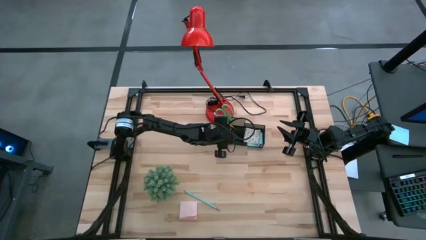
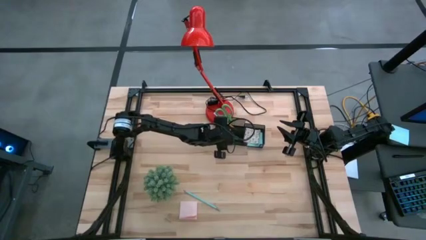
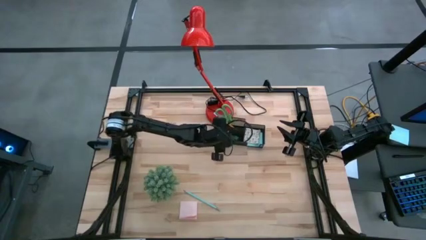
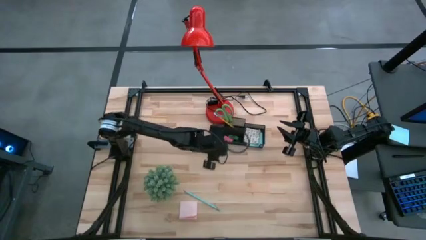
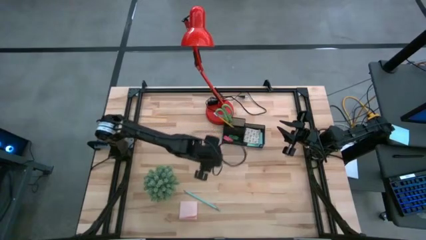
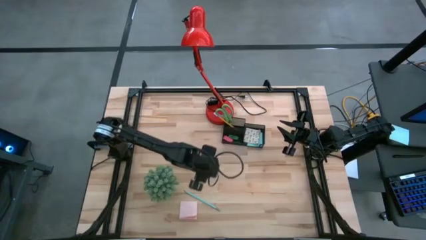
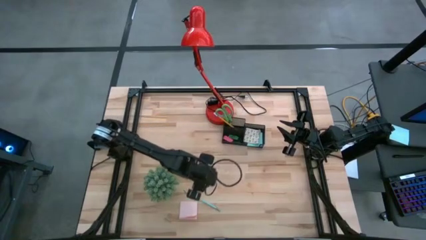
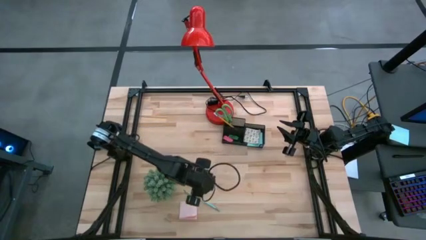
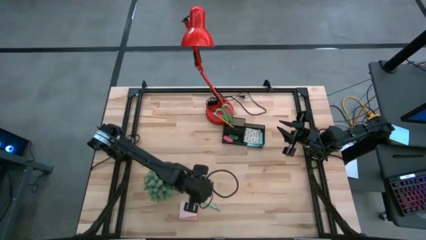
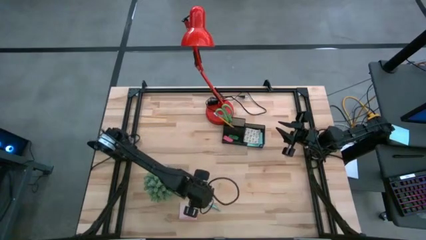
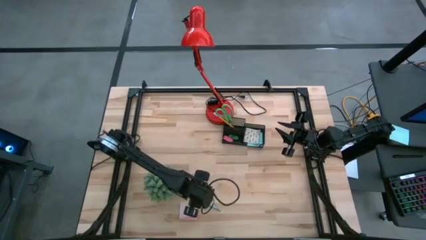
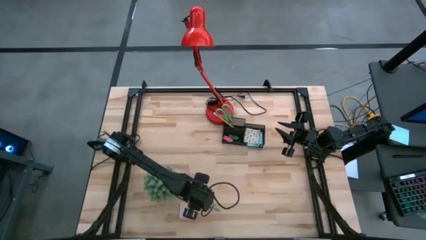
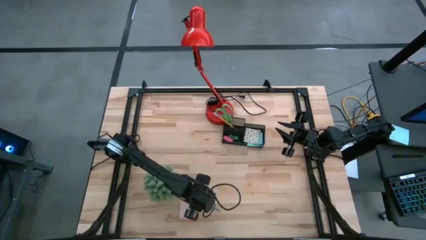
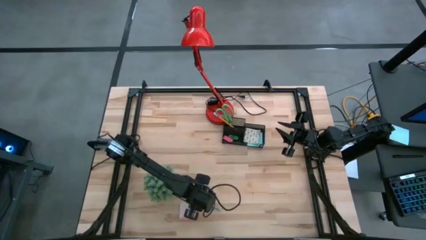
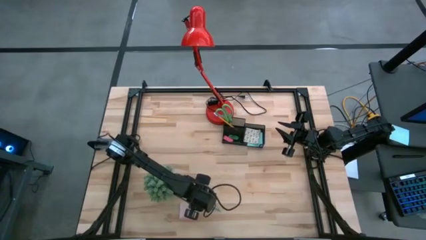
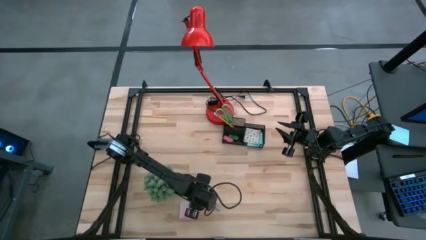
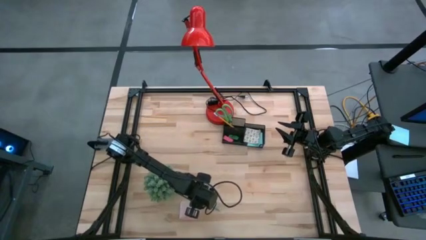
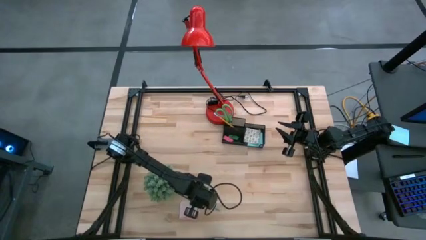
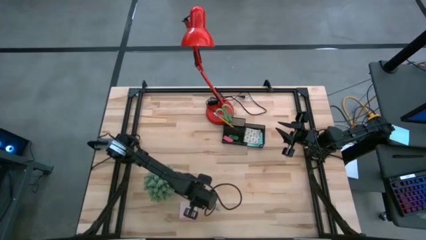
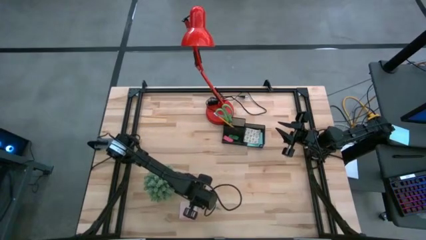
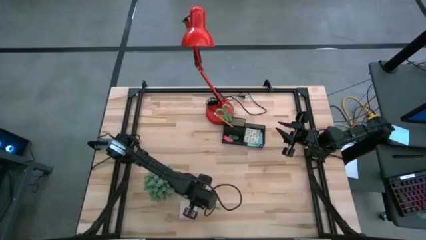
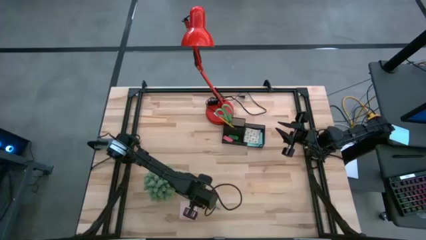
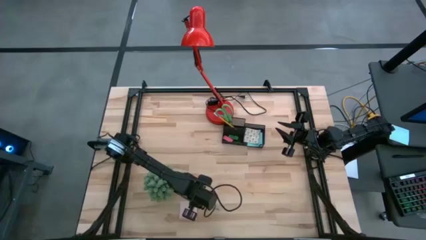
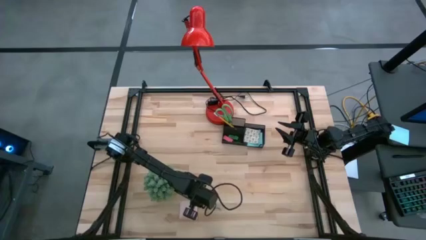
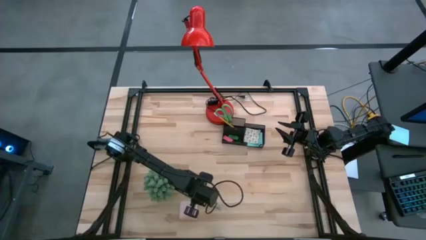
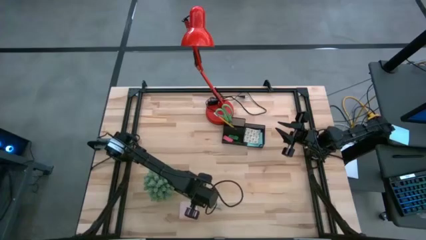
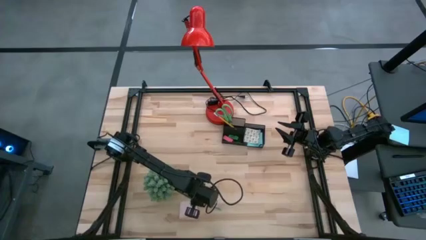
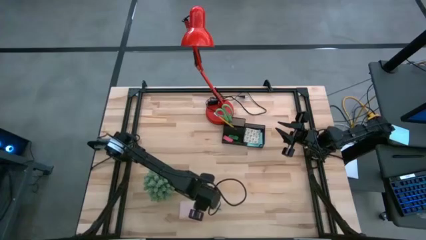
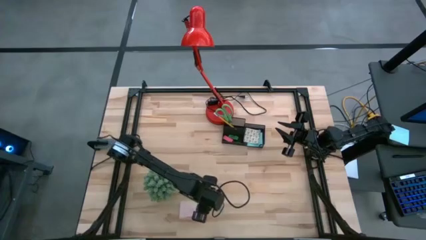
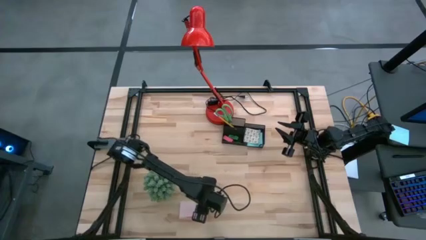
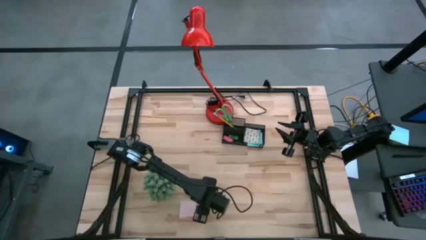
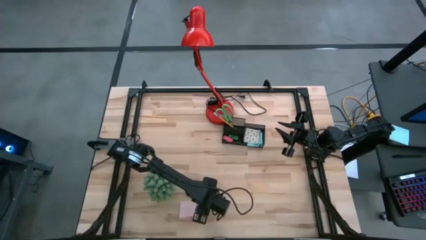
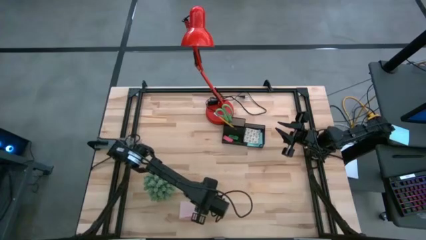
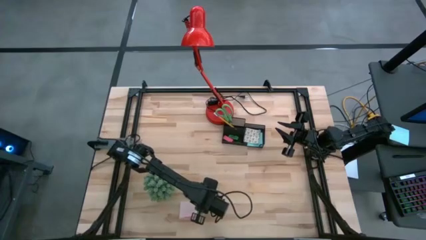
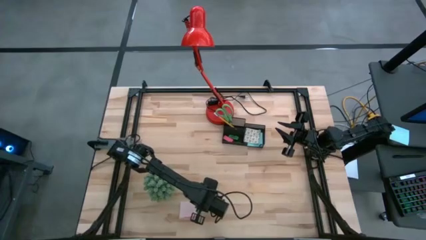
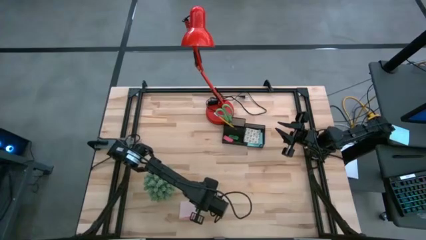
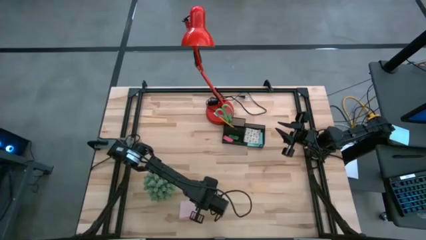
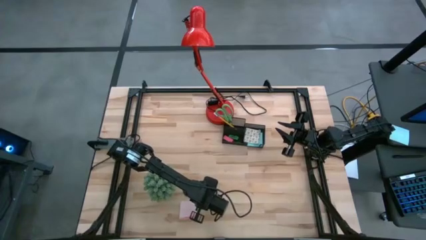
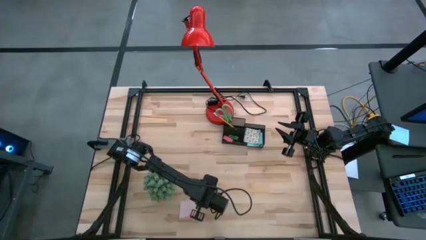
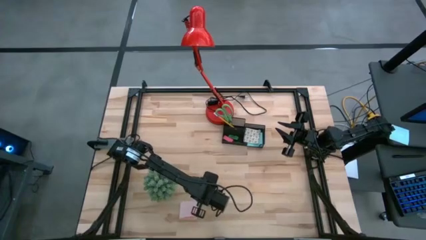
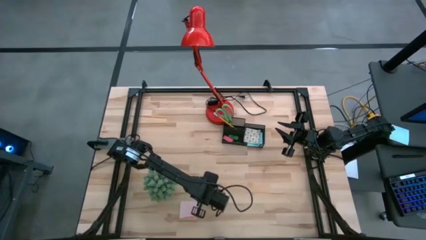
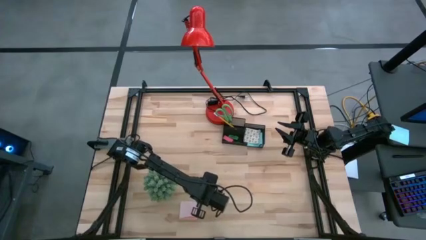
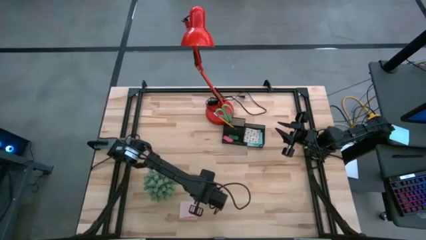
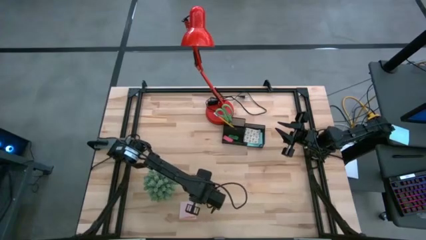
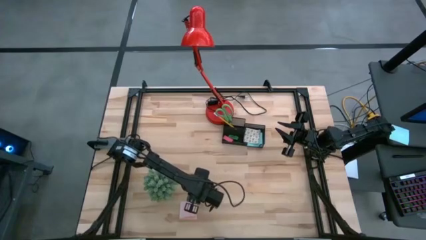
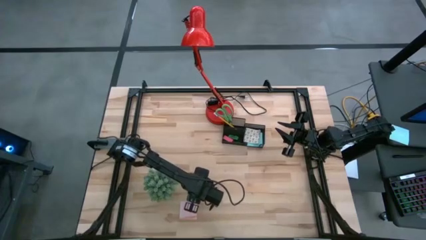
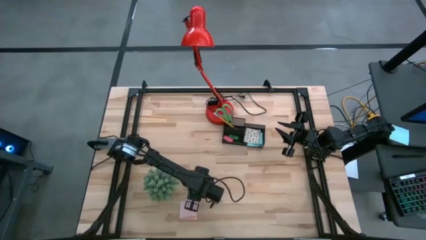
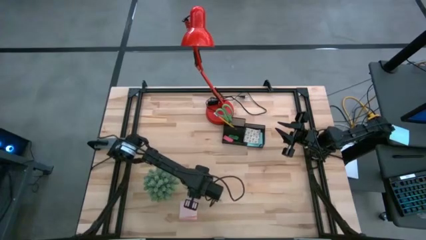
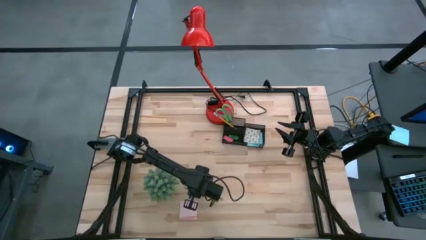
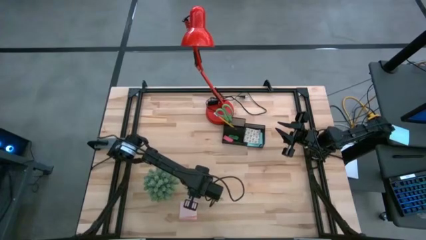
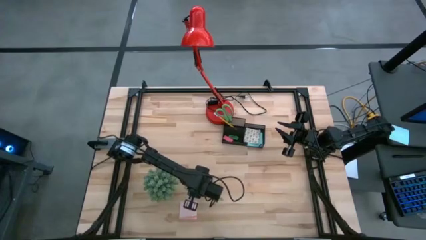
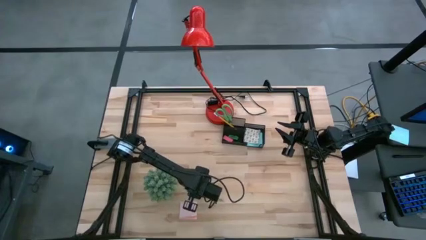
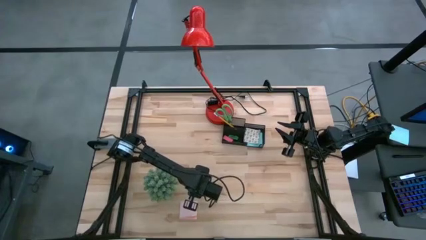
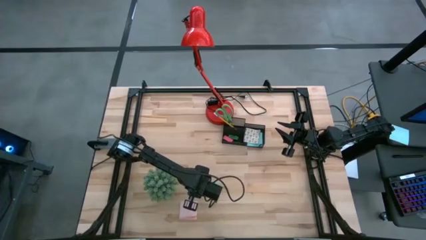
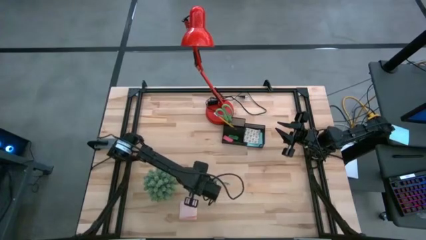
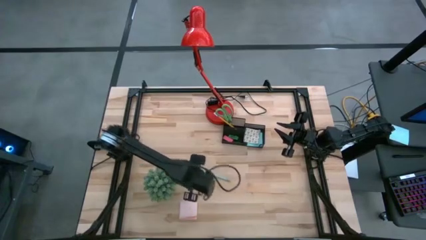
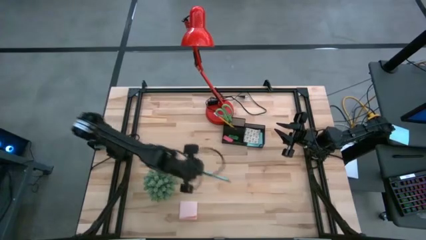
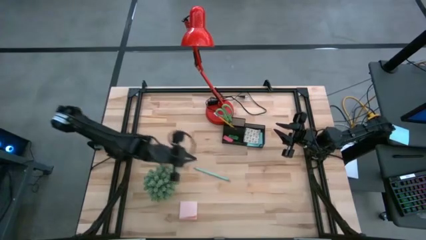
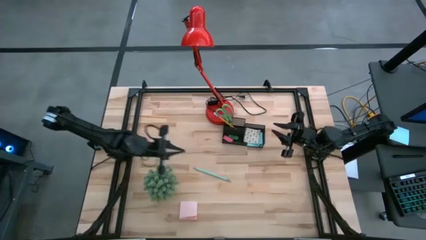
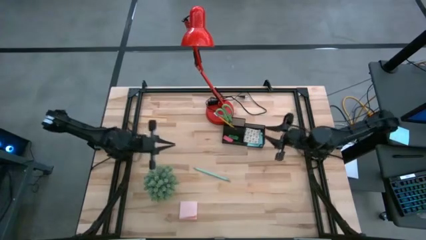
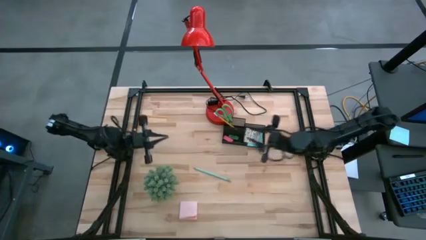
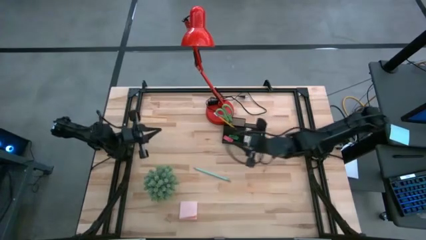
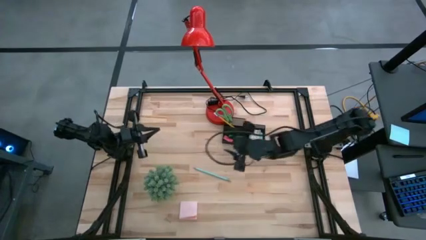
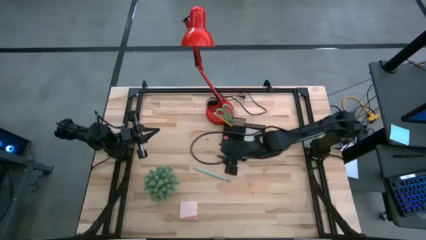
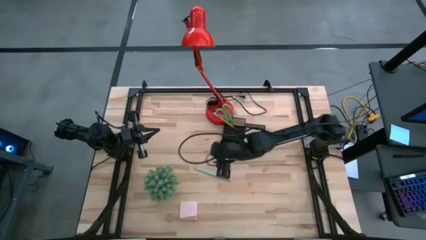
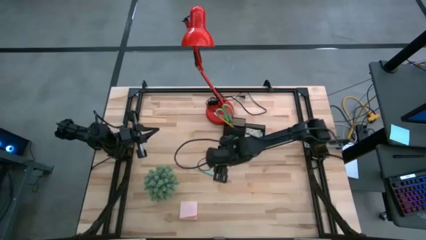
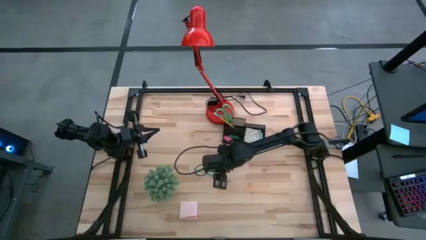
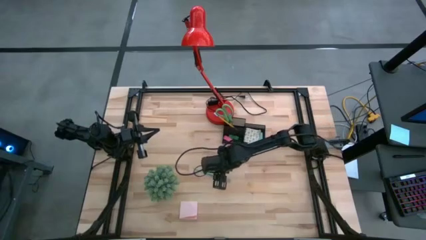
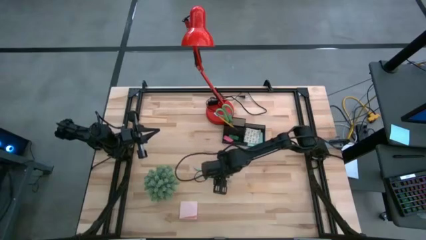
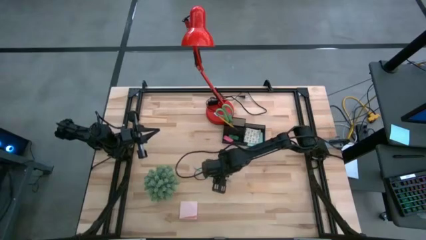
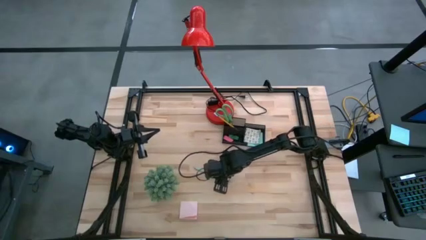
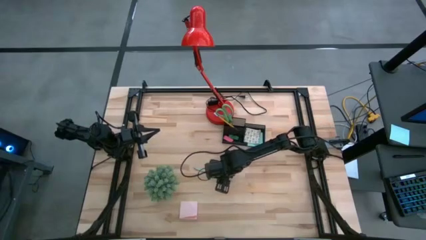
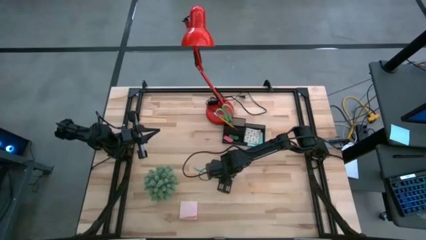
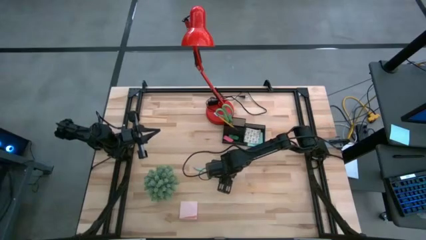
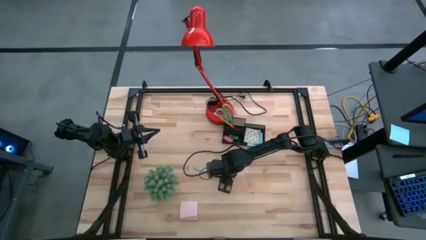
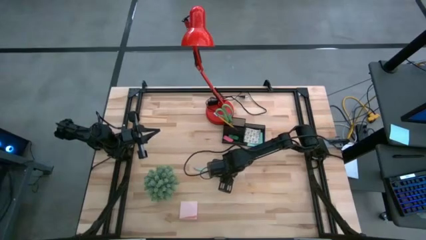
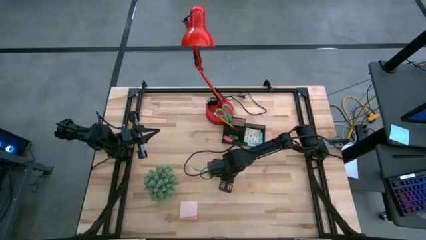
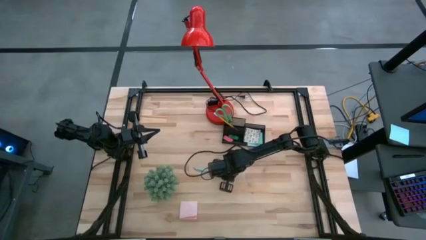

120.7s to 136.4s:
Task: Pick and place office supplies into organizer
Put the blue pencil into the back left compartment of the desk organizer
